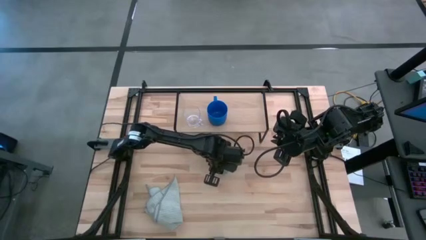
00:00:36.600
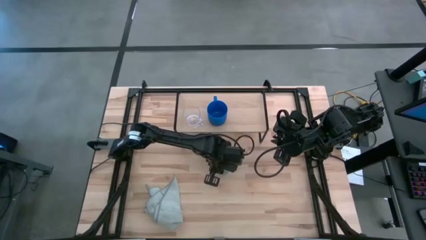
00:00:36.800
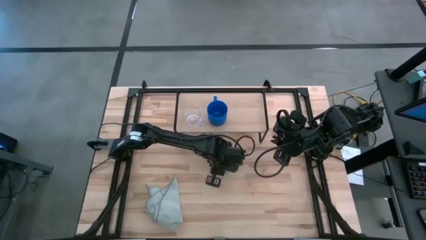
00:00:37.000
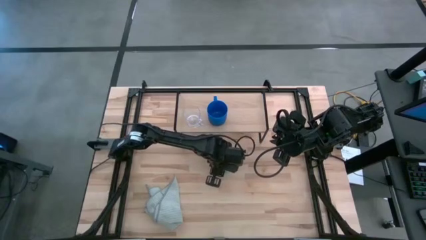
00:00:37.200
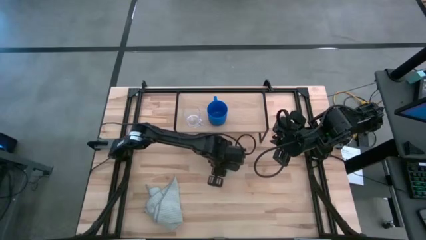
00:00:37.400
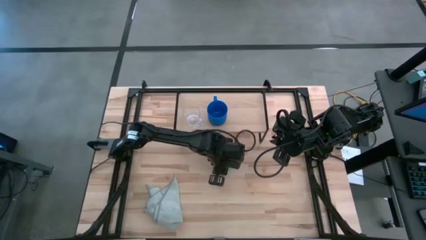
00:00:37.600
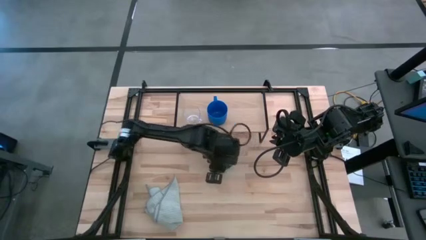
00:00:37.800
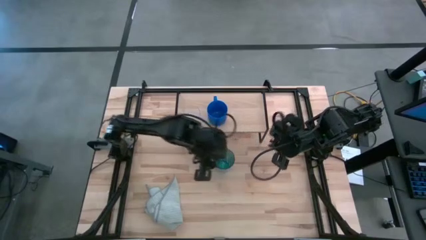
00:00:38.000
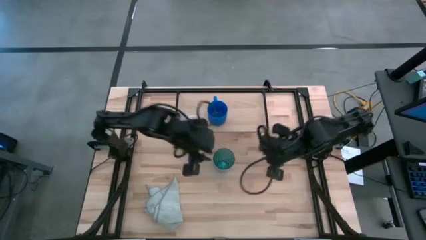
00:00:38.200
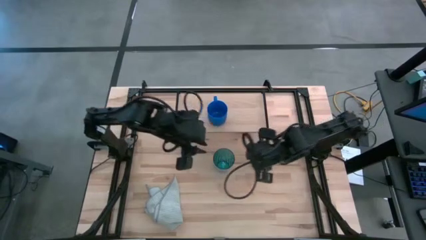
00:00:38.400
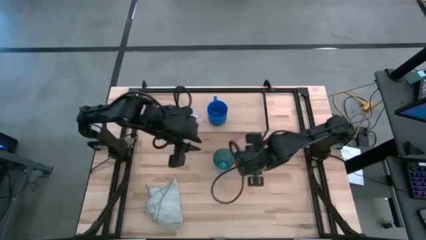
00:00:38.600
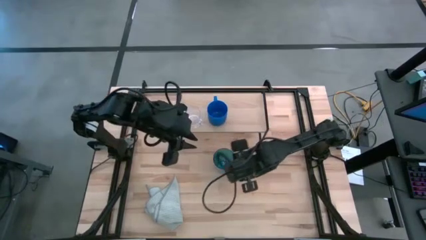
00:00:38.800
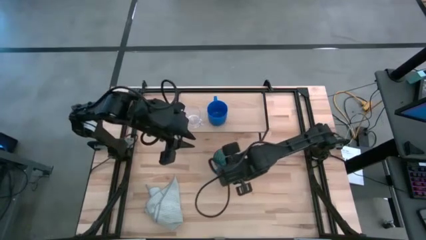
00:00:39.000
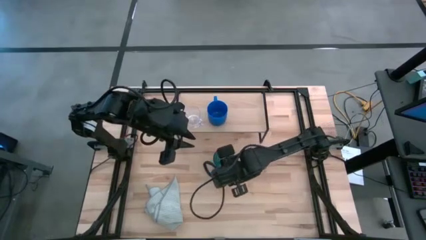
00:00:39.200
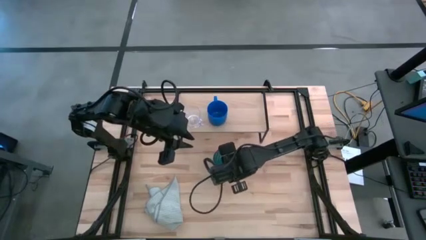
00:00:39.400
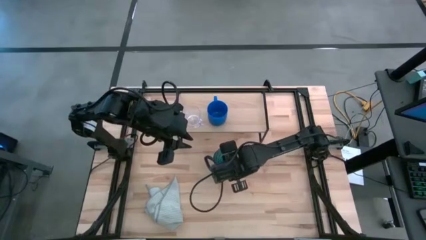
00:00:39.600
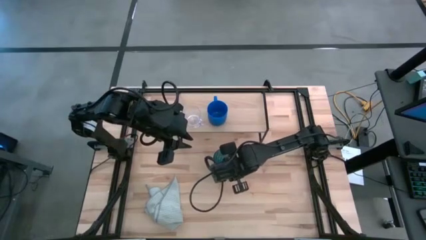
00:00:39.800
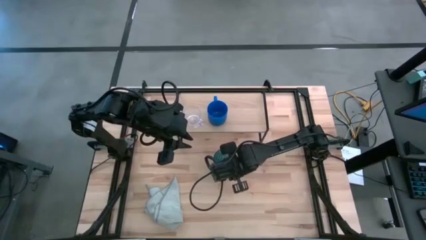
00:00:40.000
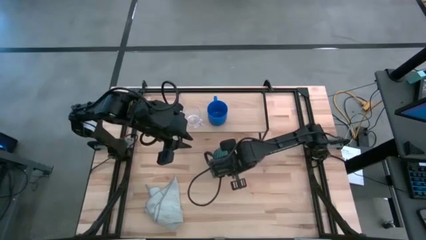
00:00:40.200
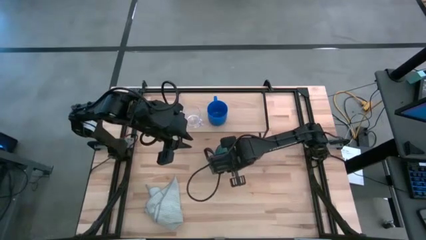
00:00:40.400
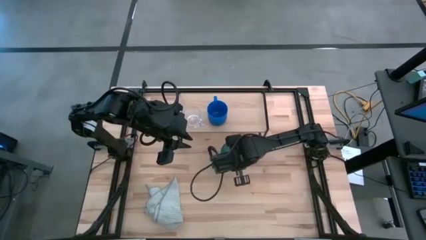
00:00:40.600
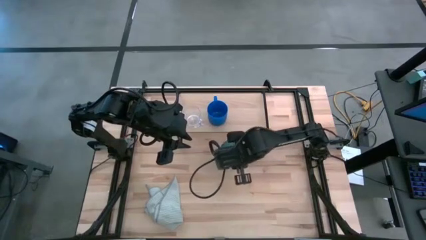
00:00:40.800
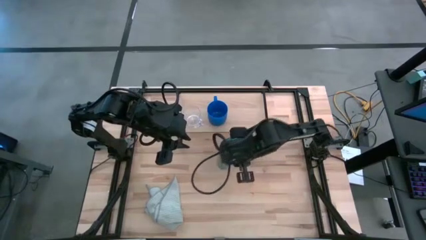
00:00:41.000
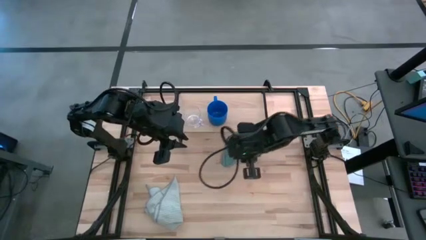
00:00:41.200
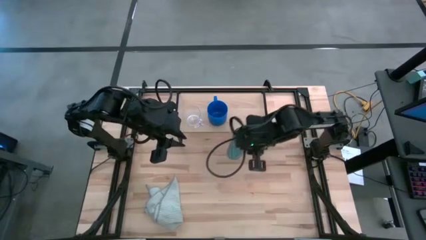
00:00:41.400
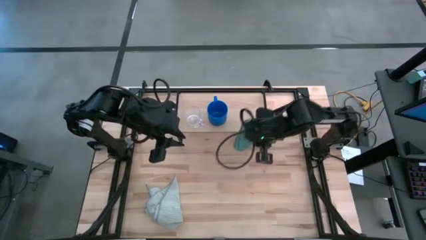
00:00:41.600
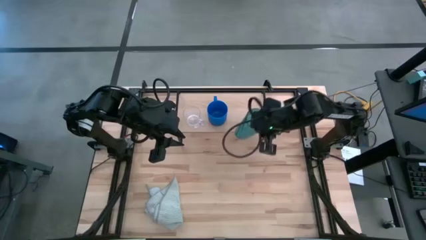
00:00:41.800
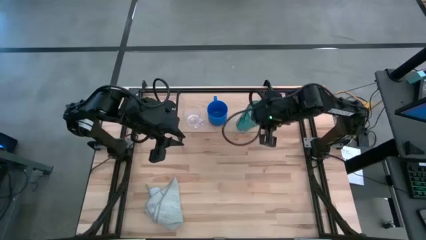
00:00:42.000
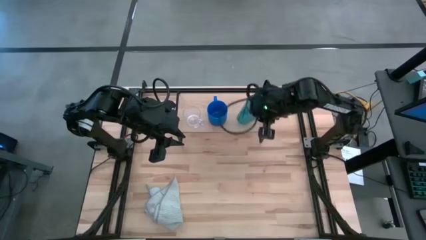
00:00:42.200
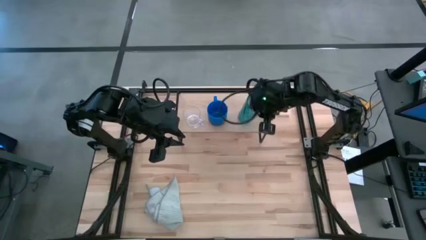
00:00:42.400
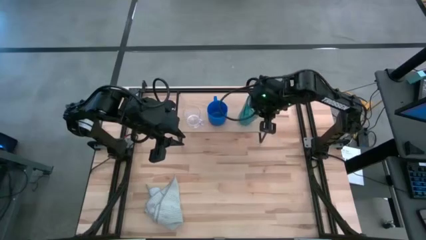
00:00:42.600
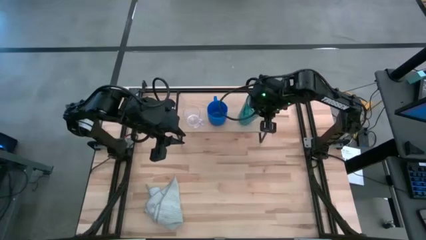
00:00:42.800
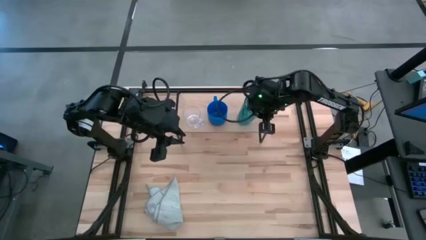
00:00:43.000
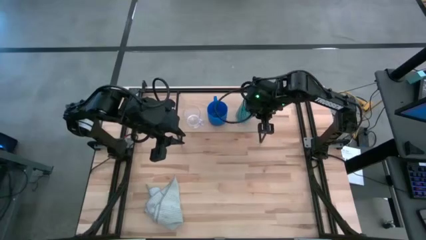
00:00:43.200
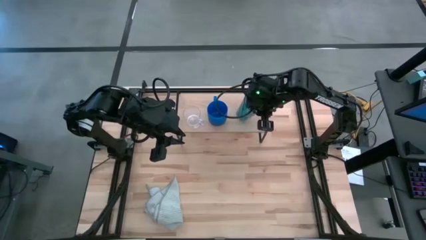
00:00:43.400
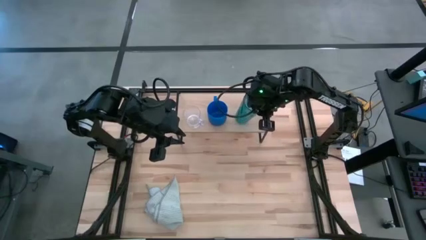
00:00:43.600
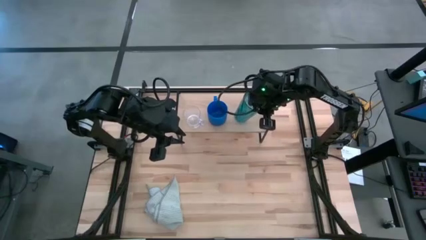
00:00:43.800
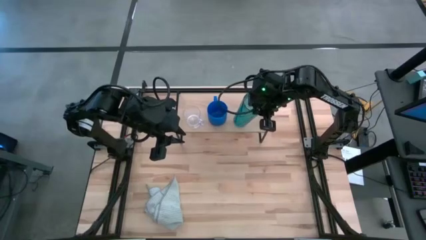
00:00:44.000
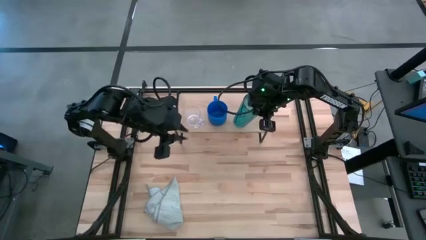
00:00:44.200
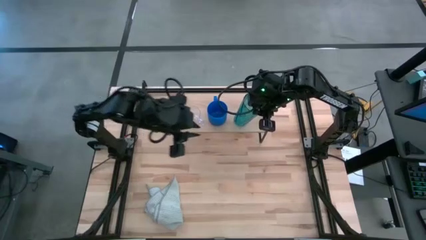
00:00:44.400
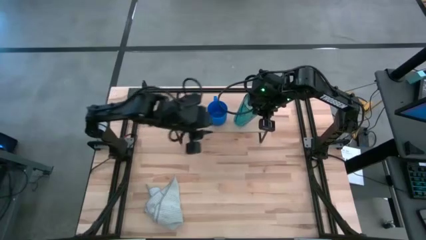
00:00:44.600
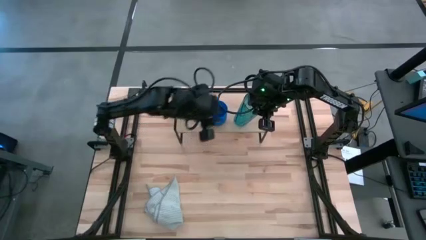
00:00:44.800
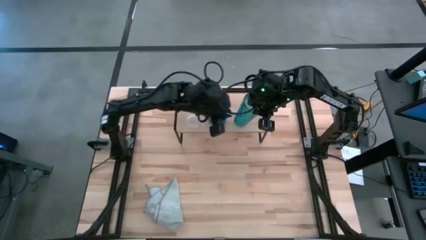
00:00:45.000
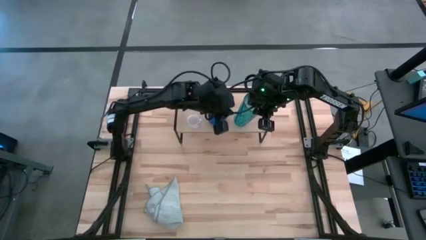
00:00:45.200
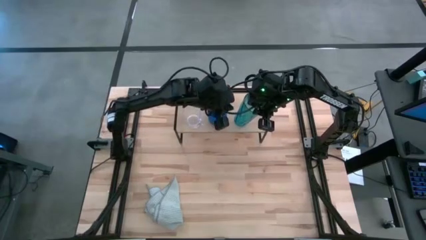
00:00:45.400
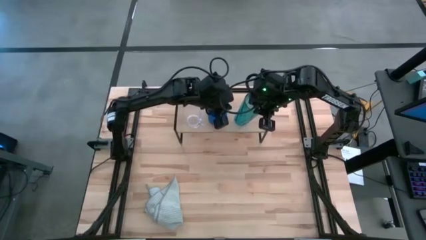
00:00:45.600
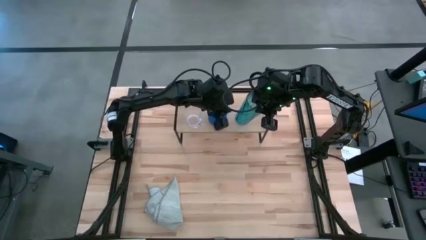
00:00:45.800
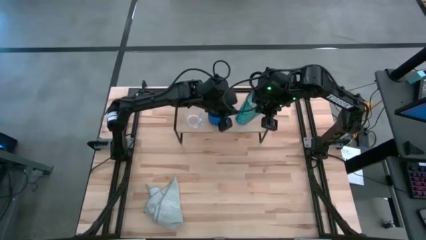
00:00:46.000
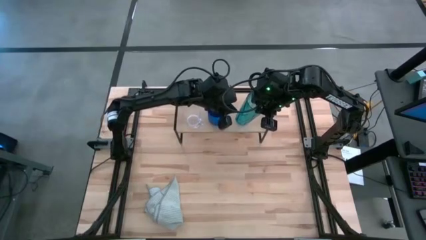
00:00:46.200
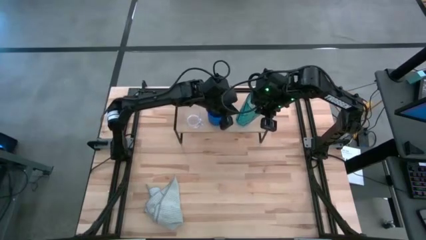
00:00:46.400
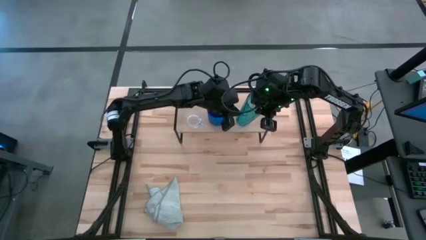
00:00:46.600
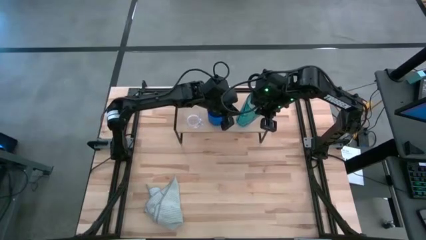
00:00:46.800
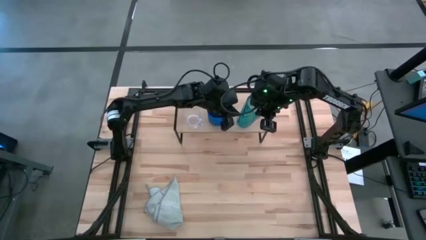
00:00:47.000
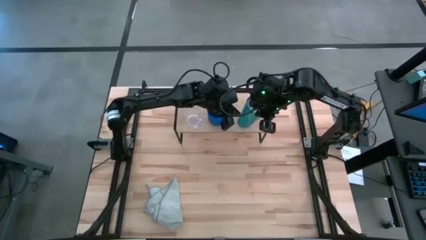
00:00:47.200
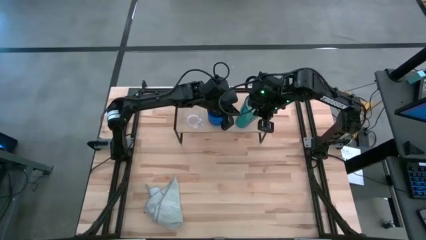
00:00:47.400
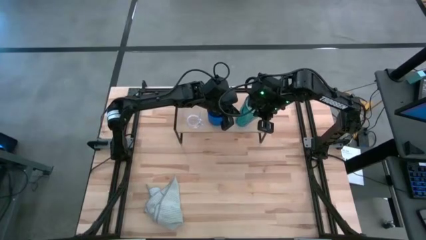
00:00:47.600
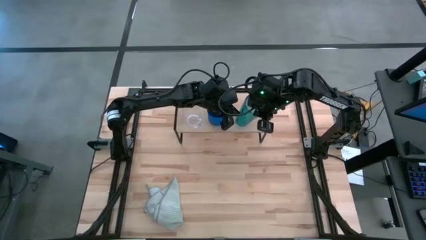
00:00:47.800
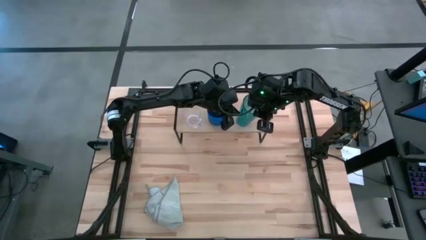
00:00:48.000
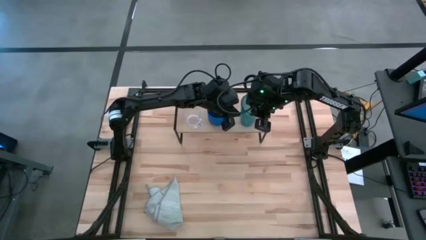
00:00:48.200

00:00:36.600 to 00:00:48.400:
Task: Stack small to large cups/mugs on shelf
Put the blue cup on the shelf
